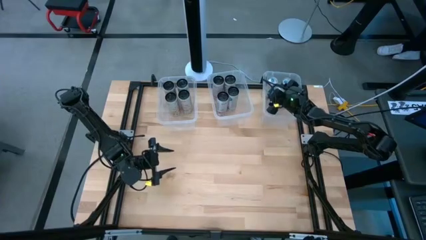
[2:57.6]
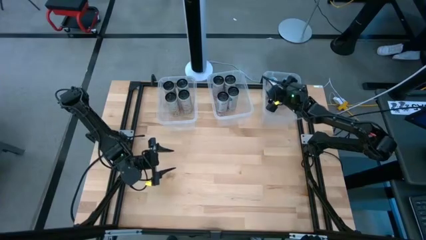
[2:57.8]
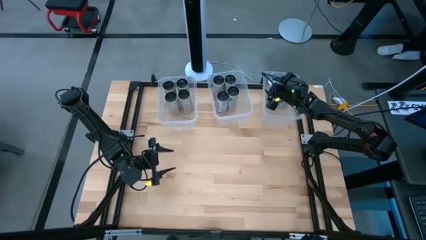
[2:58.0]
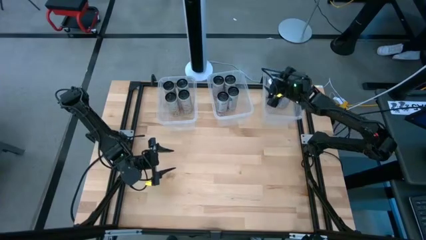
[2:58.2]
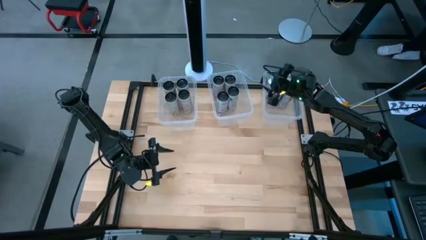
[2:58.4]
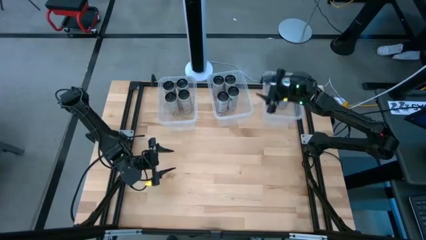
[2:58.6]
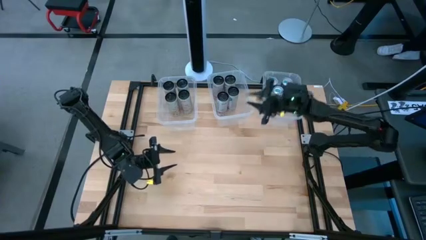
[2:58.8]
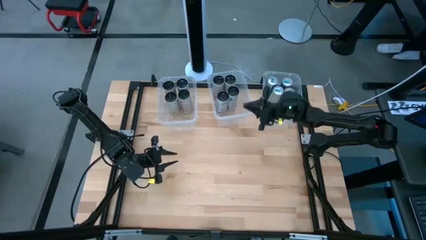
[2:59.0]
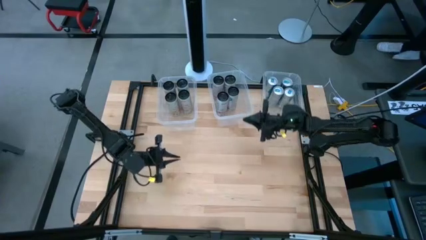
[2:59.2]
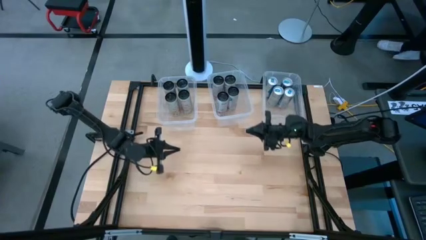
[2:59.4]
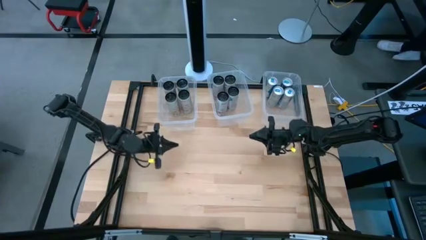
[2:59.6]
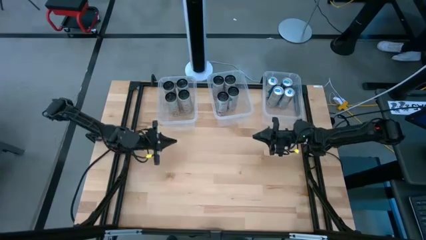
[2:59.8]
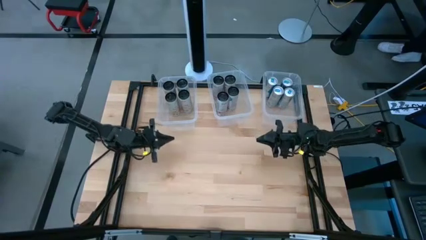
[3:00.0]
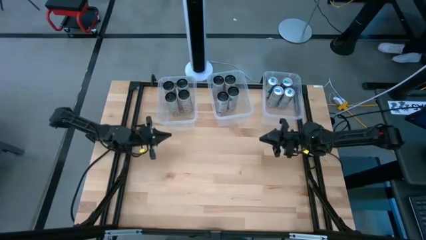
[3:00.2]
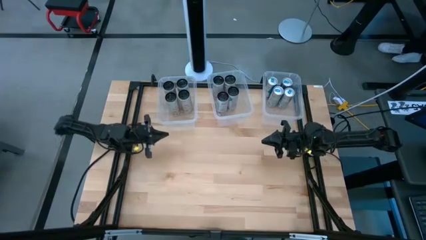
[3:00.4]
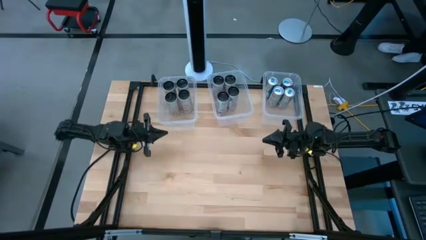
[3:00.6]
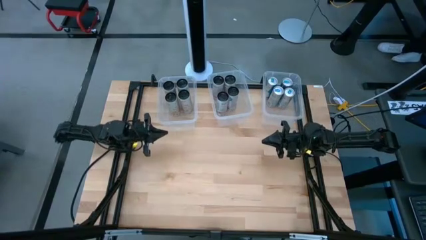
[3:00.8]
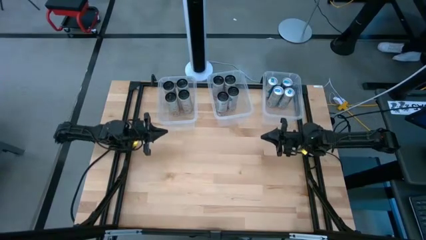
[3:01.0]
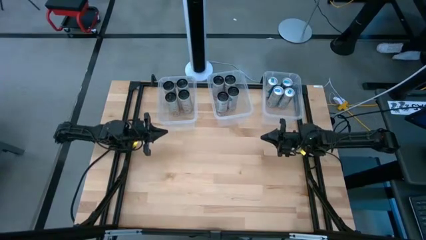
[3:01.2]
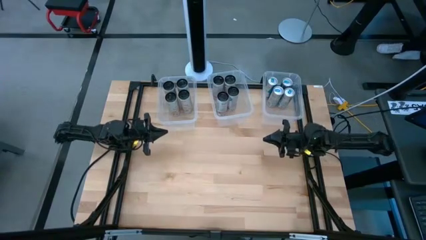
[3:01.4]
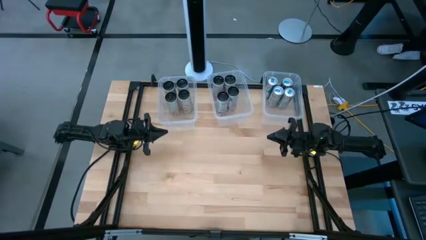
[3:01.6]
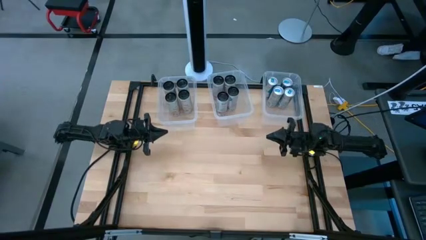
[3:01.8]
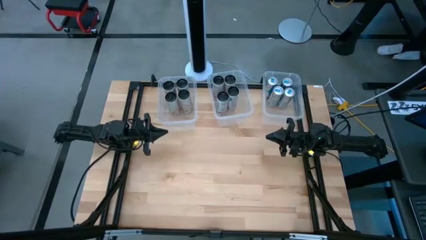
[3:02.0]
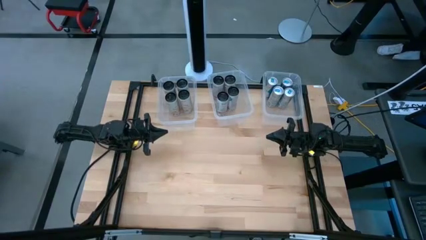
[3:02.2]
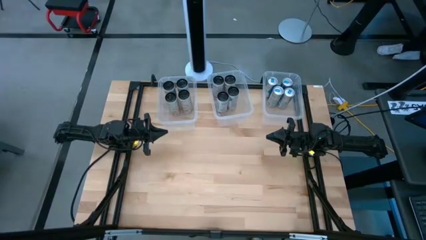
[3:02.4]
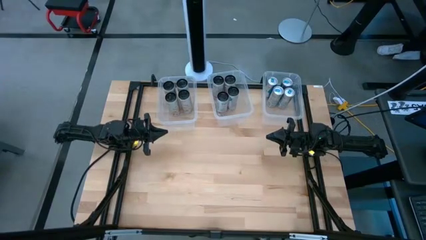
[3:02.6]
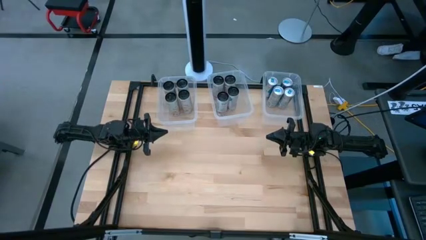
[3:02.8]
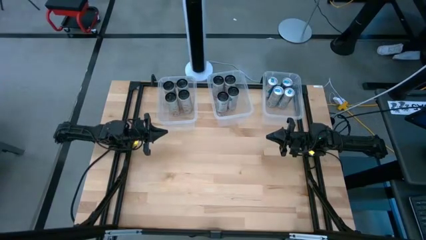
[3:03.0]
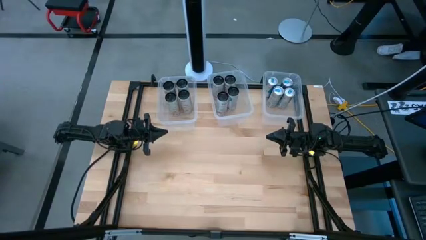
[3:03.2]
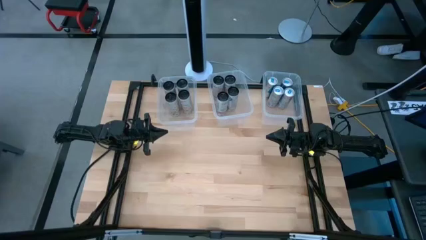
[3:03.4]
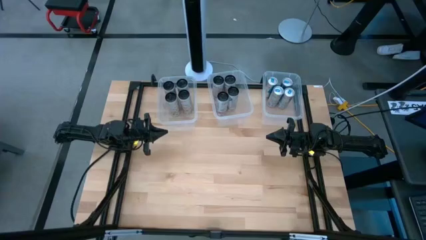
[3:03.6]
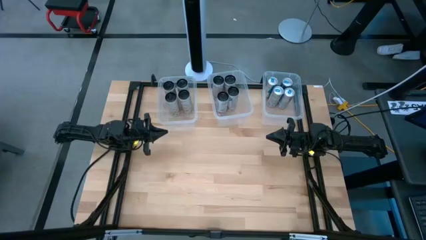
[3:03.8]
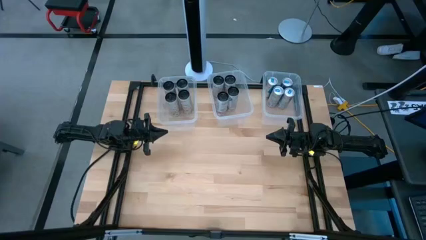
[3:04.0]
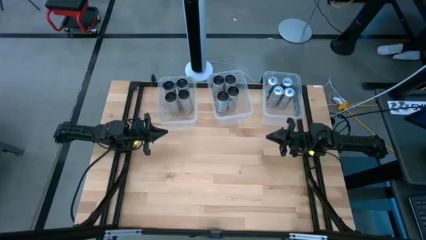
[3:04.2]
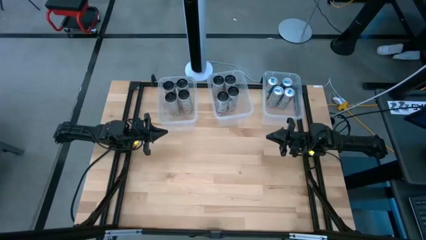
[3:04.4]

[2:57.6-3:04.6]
Task: Sort soda cans
Return to Home Position

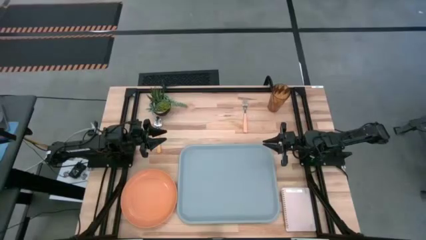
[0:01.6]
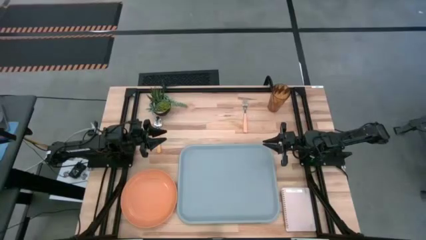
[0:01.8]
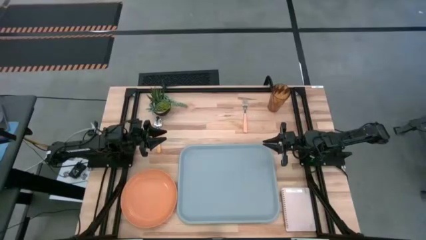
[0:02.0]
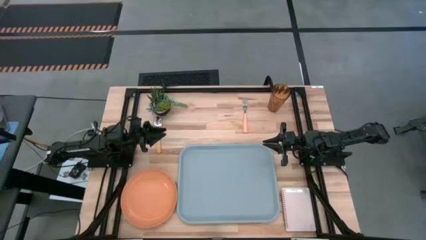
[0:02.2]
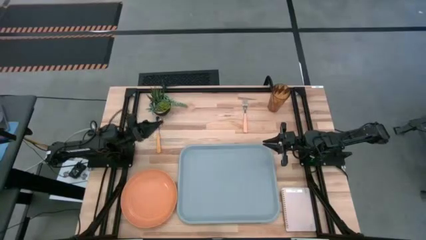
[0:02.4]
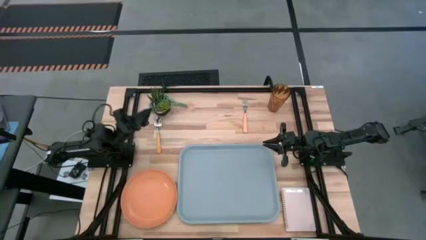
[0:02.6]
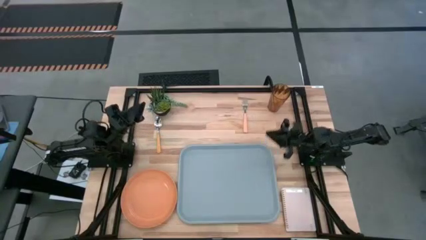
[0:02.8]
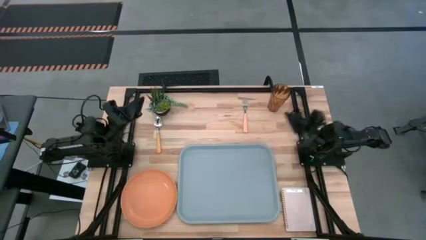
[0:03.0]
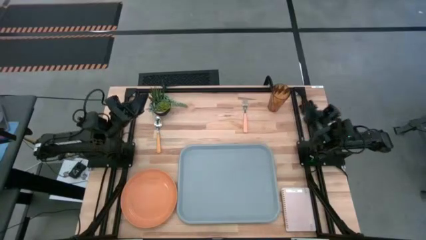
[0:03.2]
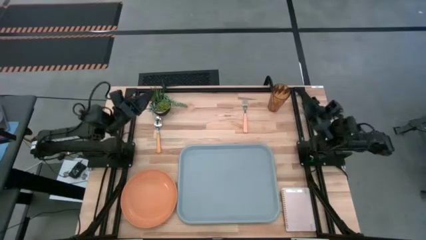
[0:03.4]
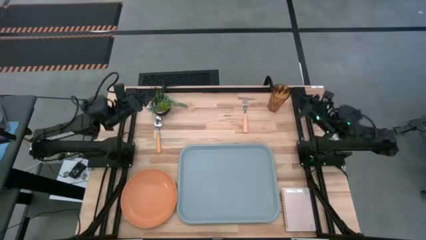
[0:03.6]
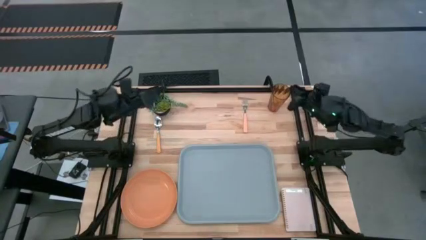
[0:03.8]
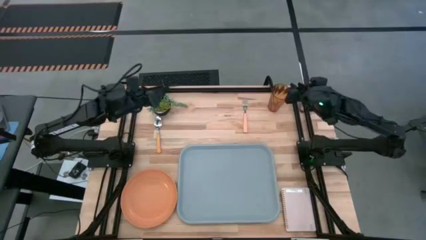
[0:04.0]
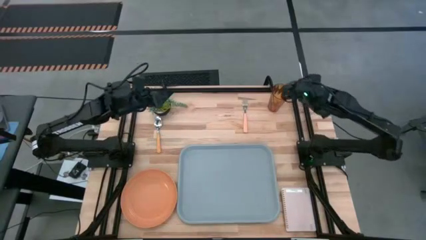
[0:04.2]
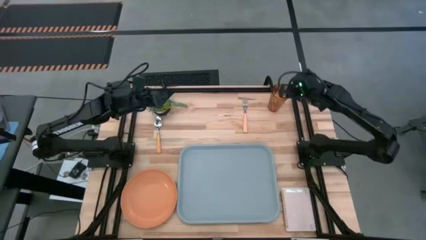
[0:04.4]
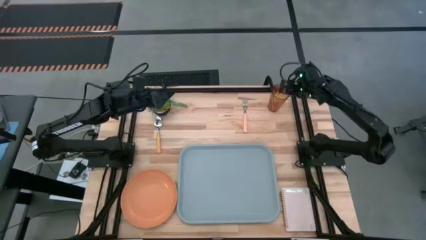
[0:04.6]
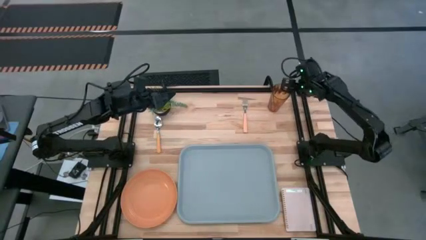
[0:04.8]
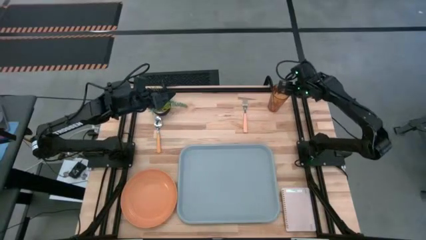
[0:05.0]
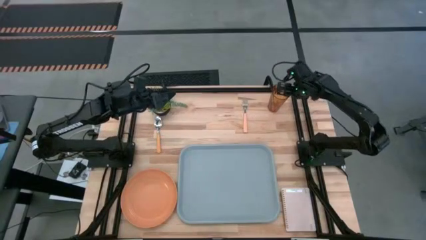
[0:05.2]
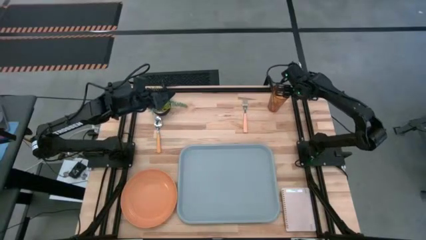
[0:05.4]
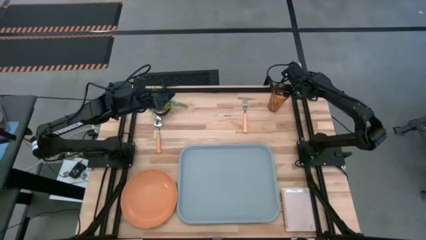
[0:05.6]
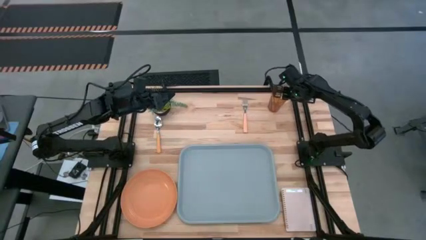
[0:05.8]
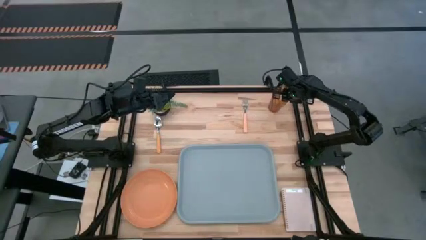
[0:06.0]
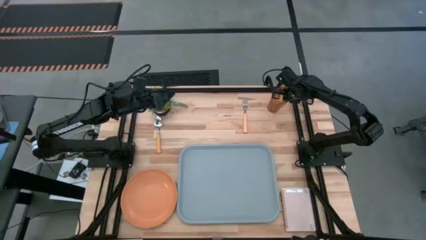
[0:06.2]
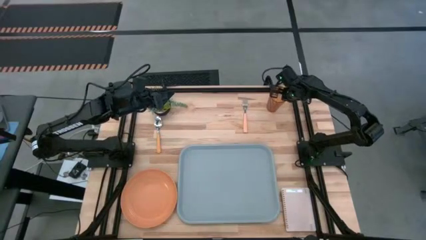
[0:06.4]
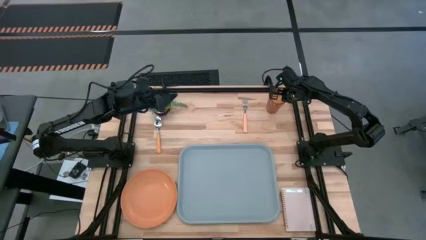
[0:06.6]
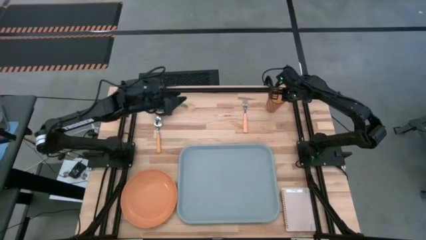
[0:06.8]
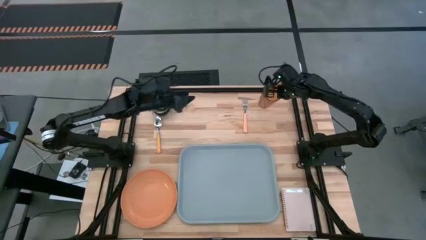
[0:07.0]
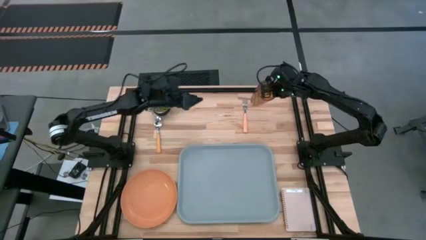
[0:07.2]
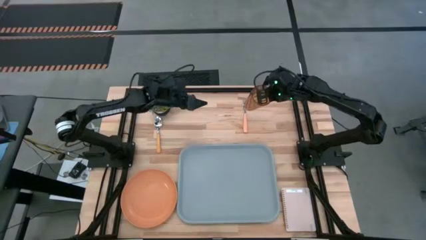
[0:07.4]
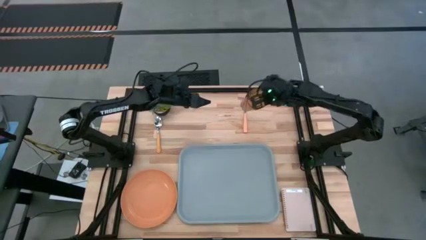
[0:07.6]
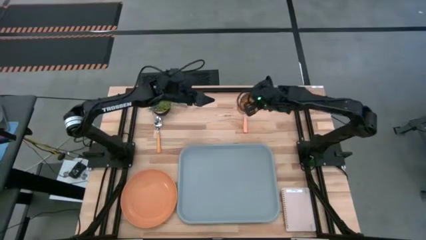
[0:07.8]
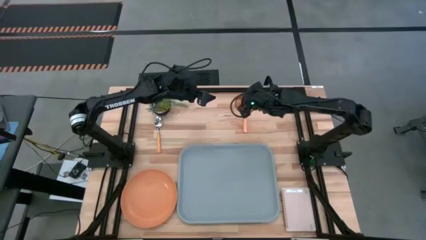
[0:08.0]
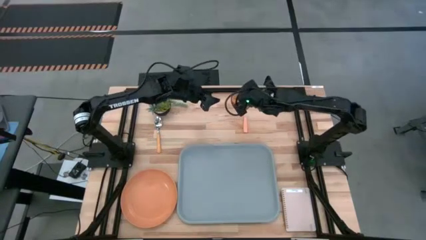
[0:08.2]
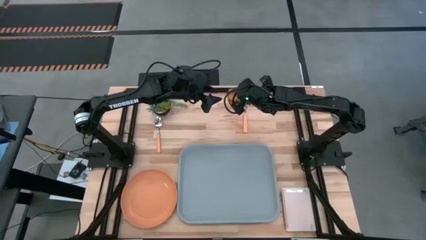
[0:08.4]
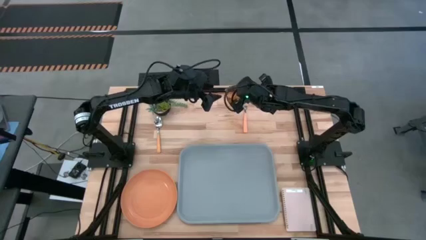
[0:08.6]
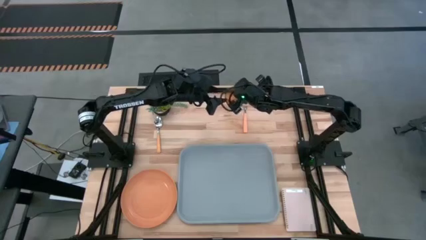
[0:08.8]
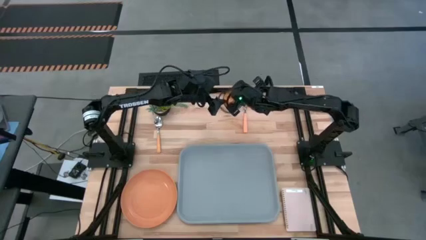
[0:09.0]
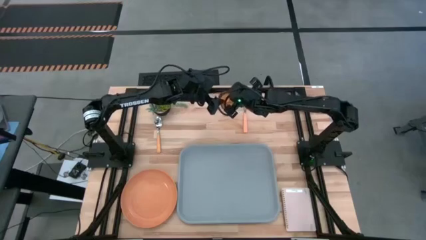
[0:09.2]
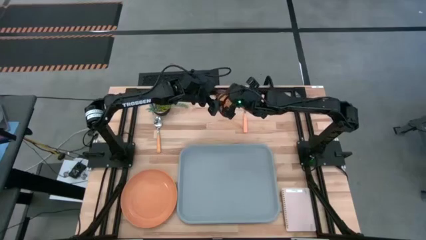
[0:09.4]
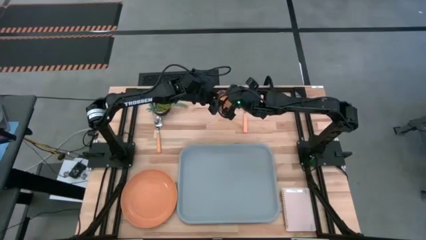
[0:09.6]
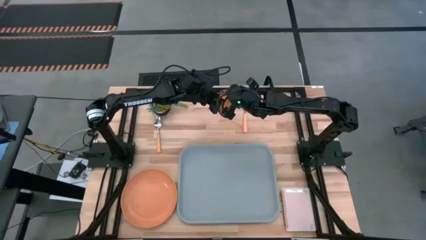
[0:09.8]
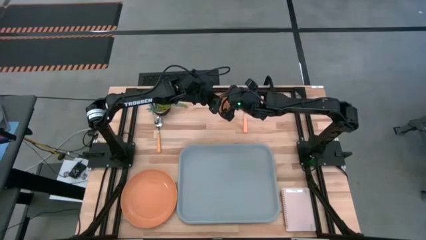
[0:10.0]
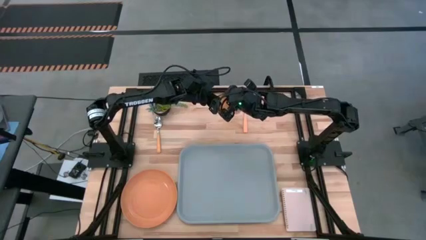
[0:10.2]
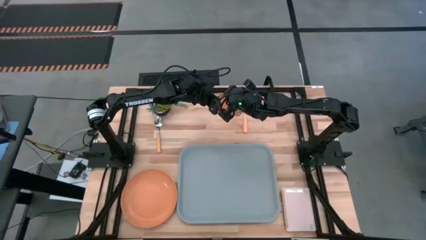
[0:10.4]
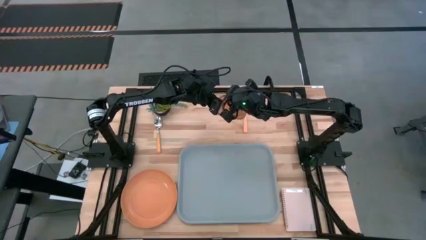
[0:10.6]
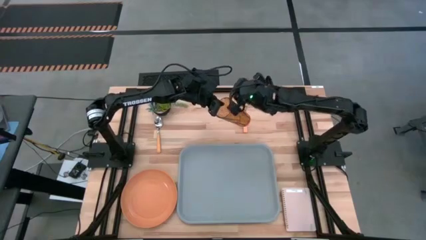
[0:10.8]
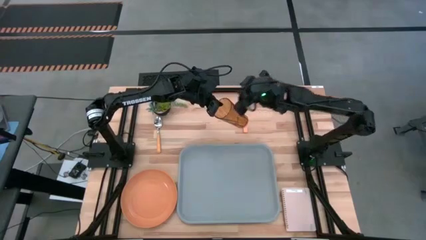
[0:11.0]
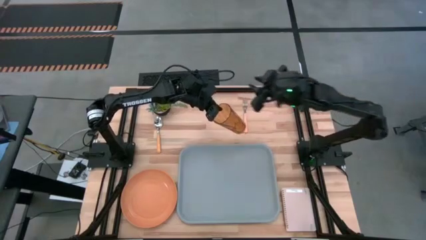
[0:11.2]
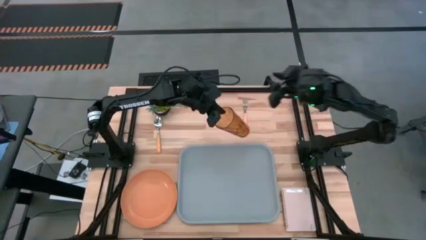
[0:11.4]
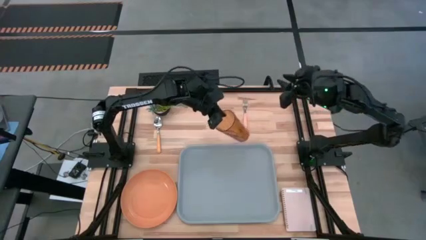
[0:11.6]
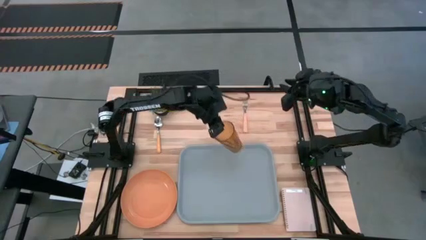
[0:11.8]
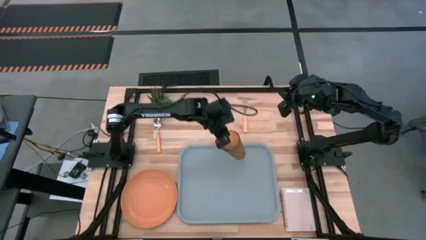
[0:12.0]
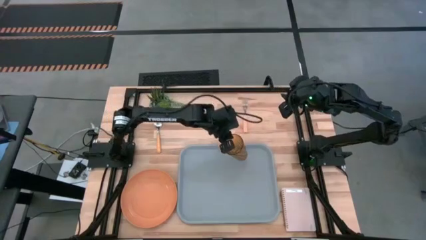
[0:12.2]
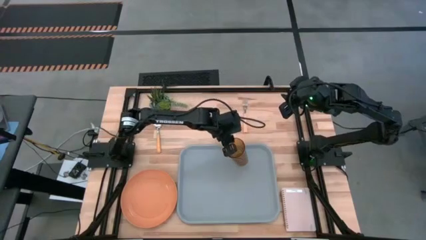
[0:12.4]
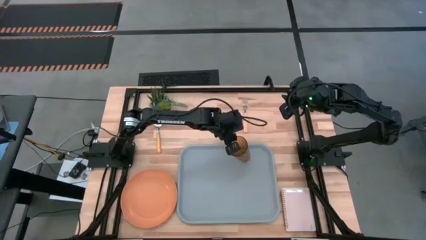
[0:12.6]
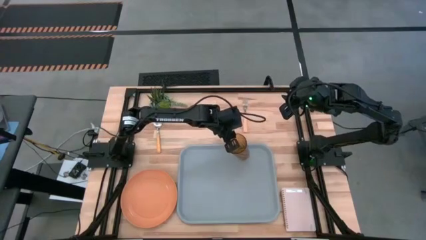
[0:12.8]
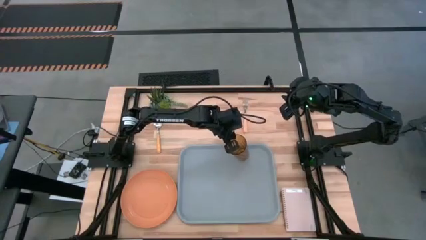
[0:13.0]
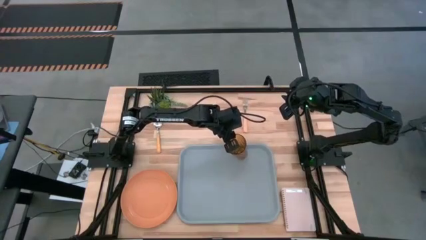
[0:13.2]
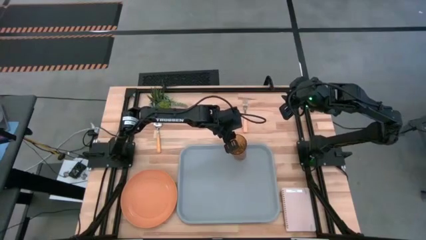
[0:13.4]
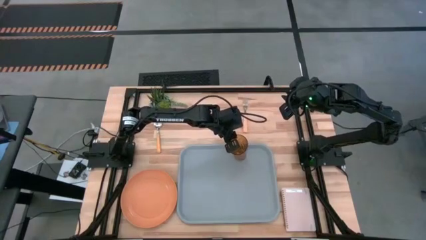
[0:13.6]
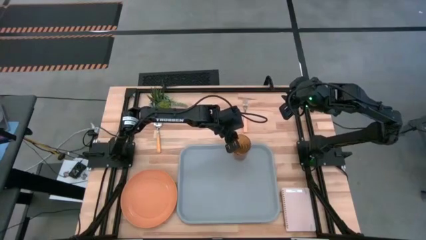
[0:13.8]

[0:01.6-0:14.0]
Task: Pick and place plate/cup/fork/spoon on tray
Put the orange cup on the top of the gray tray
